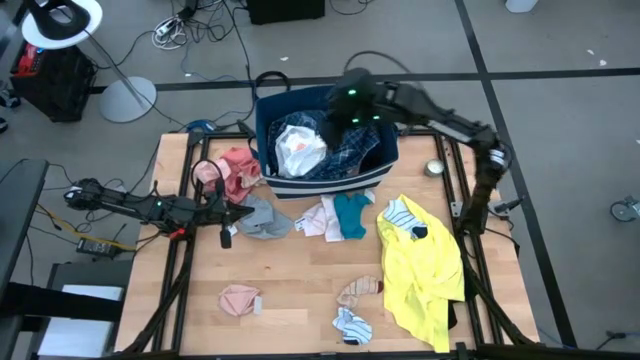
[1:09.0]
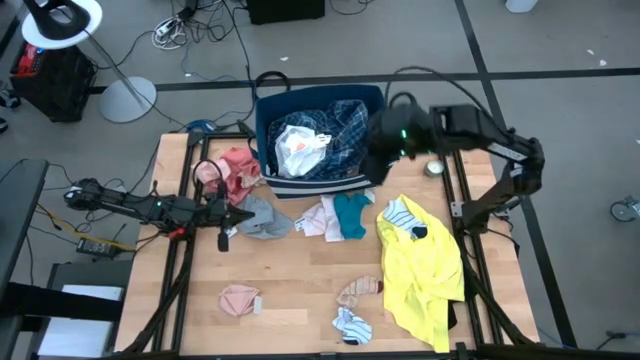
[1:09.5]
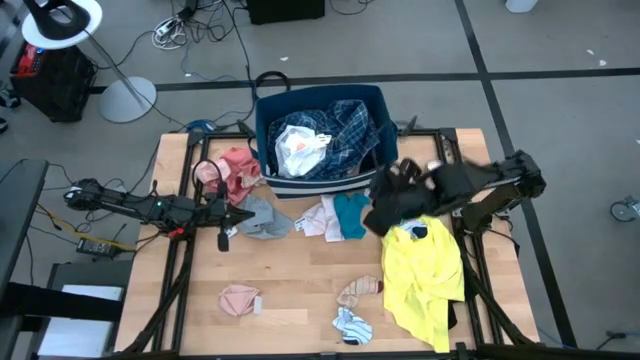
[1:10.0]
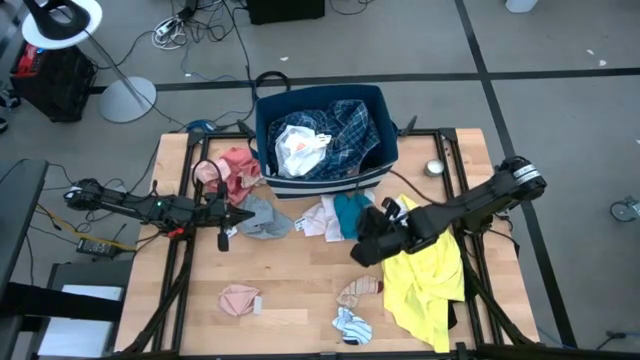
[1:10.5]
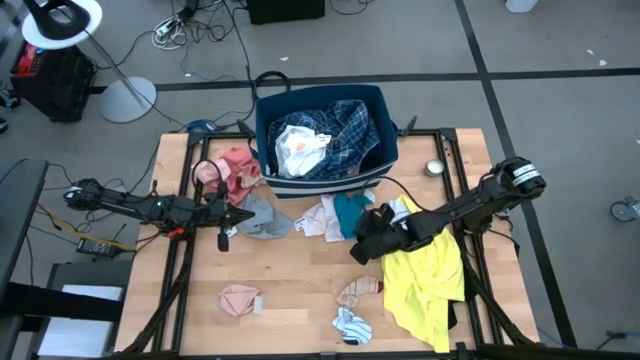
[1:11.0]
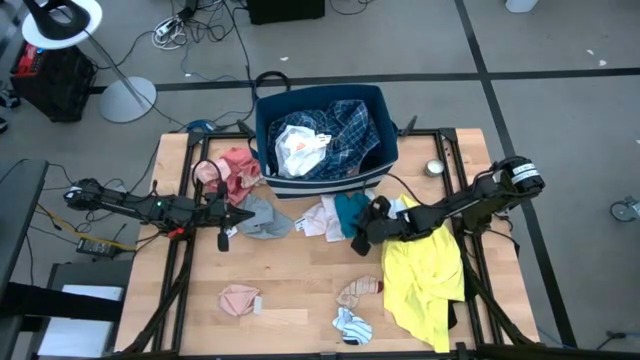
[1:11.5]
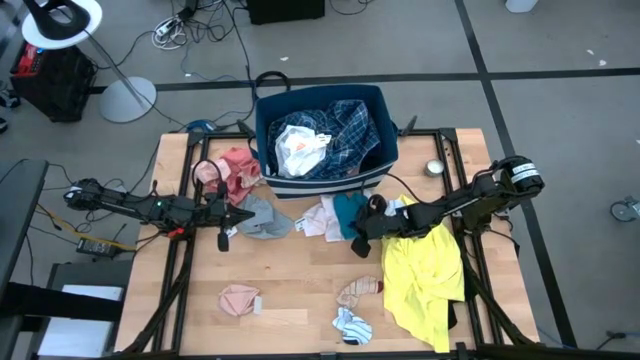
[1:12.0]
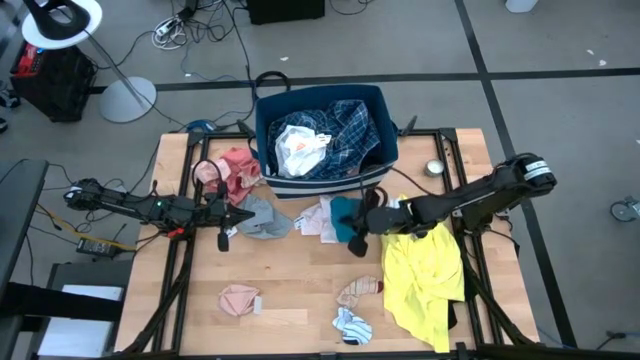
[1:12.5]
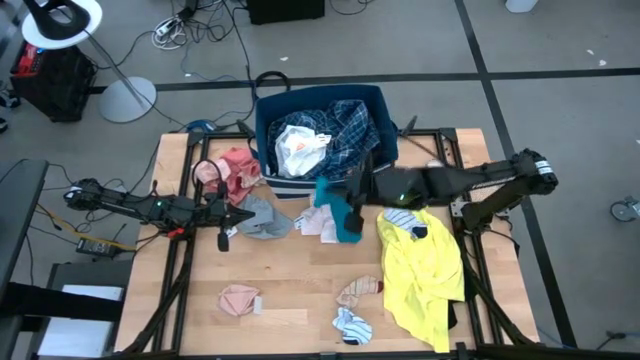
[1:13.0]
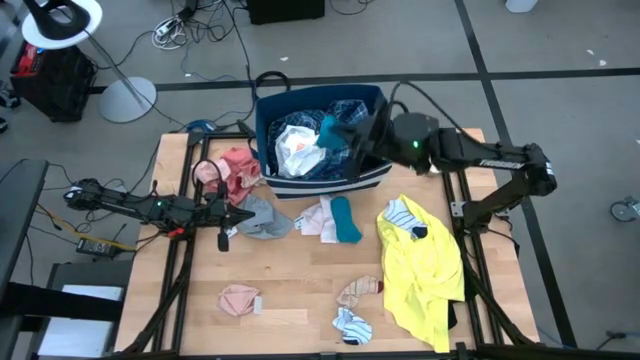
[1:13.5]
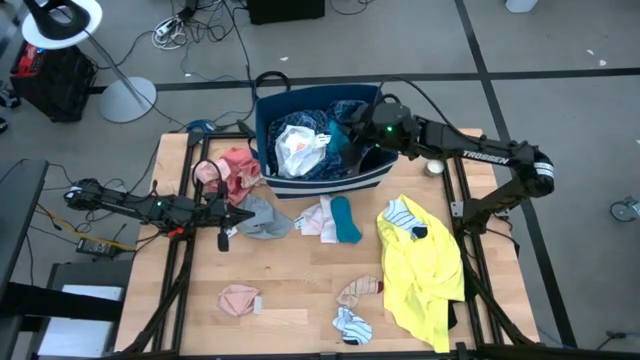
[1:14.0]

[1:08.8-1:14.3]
Task: Sort clothes
Put the right blue sock into the blue bin

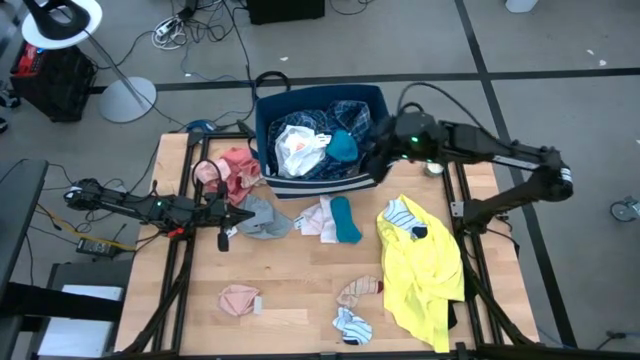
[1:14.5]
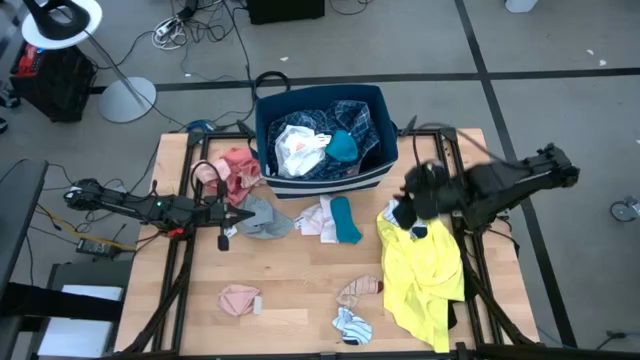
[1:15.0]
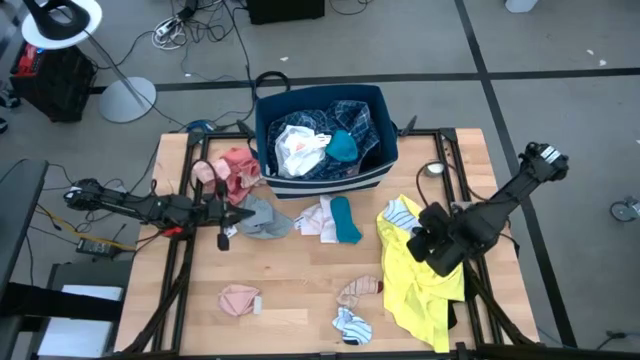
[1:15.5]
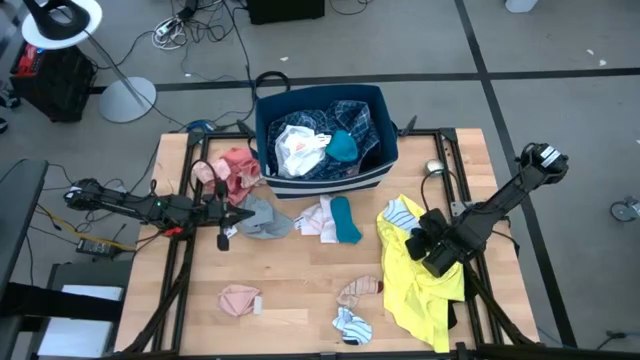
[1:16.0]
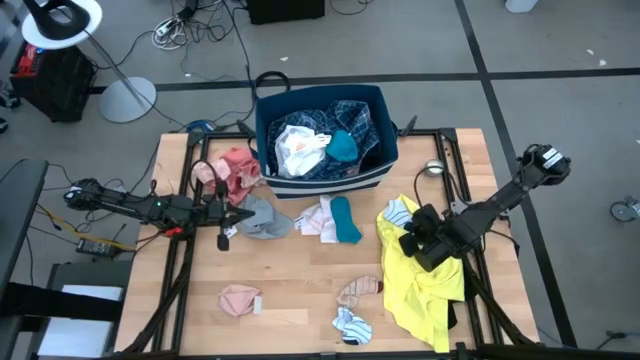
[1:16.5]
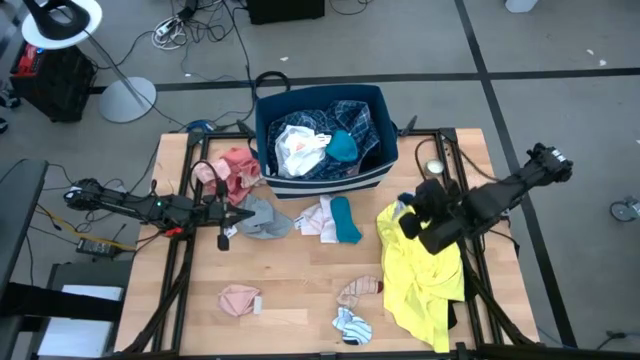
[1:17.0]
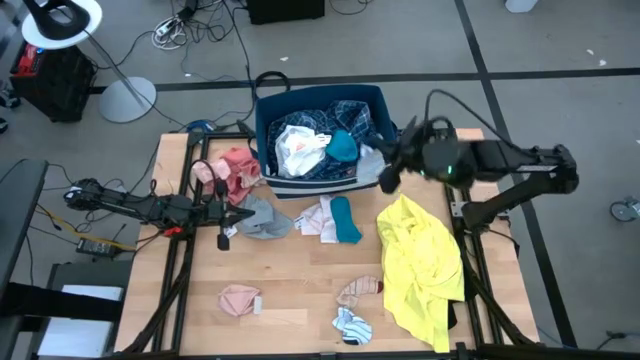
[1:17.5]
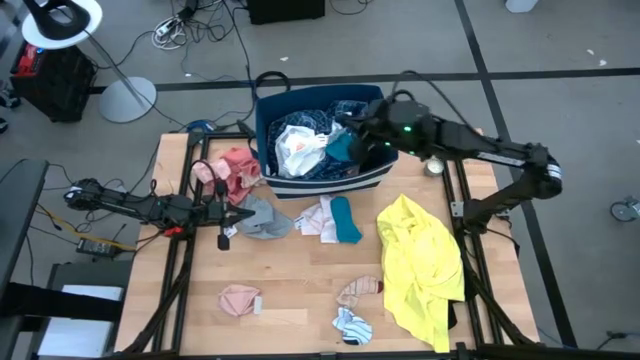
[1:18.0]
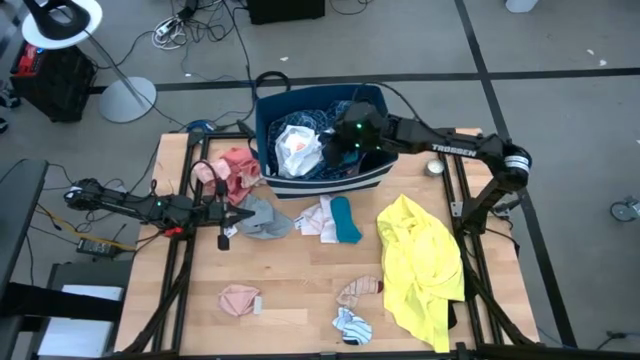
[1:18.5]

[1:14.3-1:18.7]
Put the top white striped sock into the blue bin

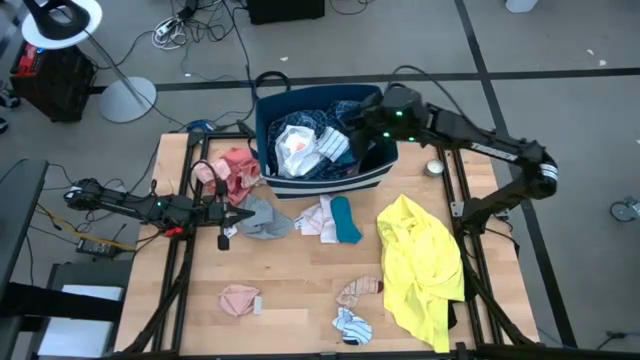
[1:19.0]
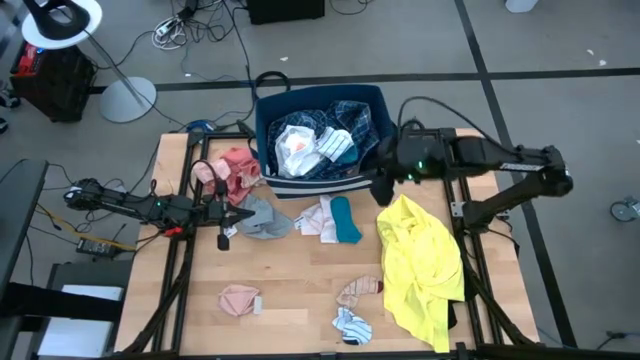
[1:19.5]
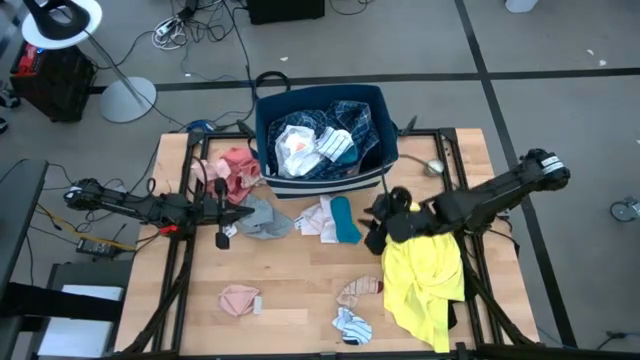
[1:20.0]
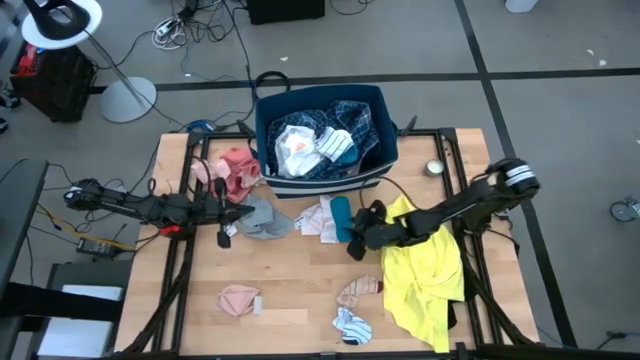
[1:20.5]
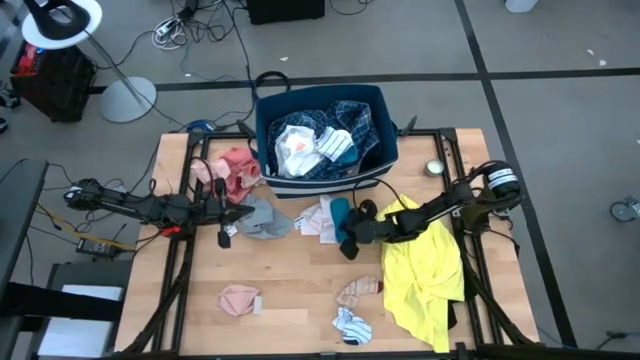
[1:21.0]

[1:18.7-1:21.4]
Put the blue sock into the blue bin

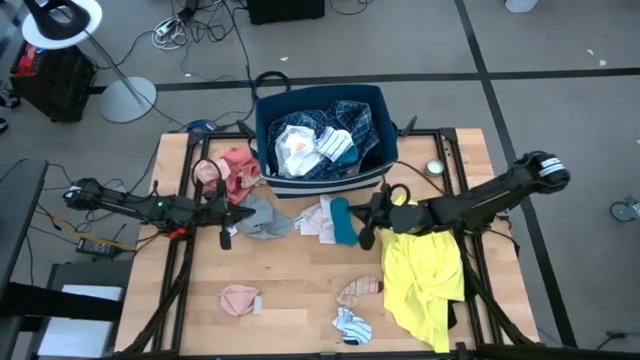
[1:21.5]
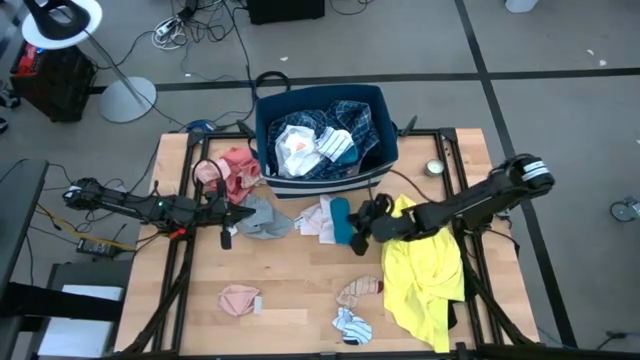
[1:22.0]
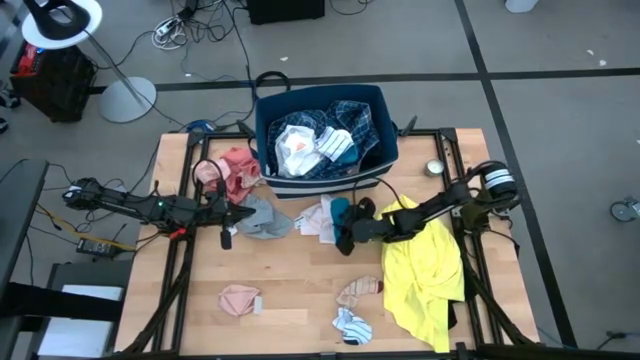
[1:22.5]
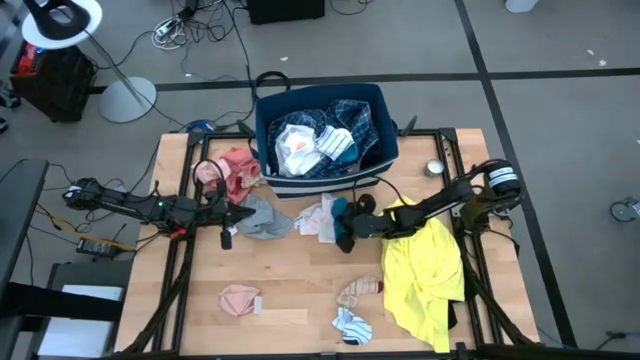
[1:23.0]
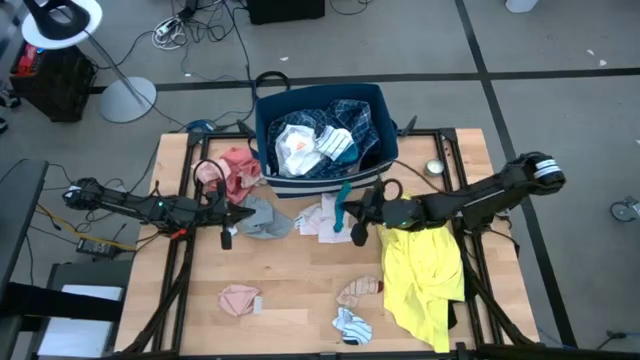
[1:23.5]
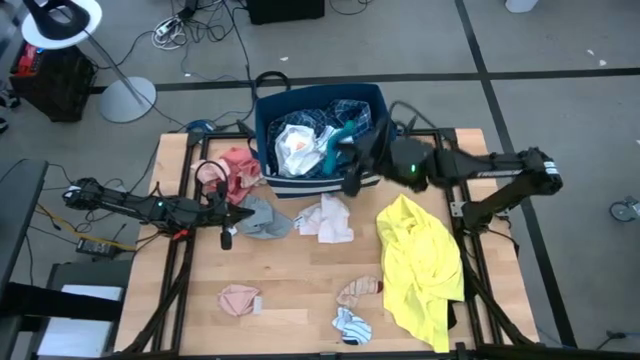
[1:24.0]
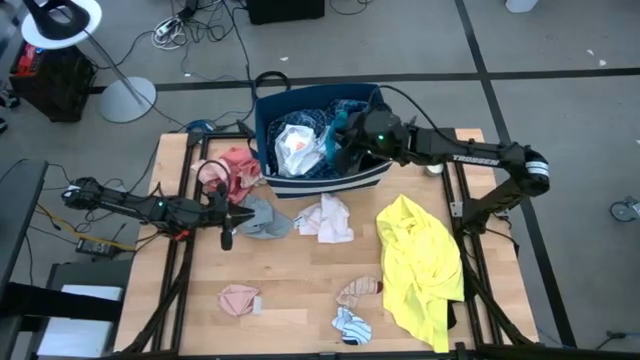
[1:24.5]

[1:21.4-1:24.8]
Put the blue sock into the blue bin

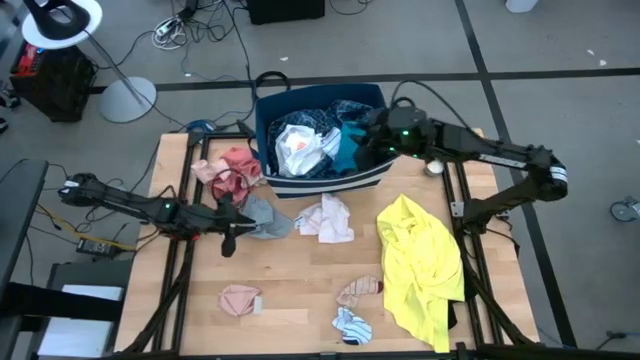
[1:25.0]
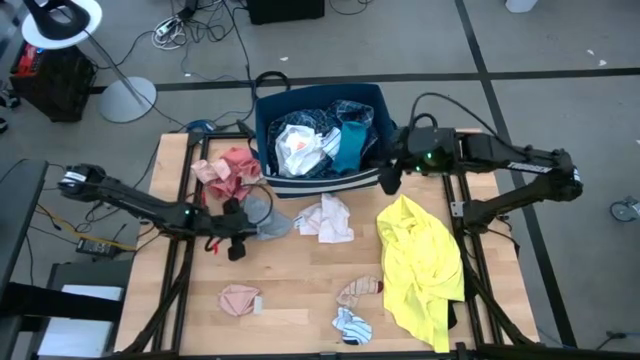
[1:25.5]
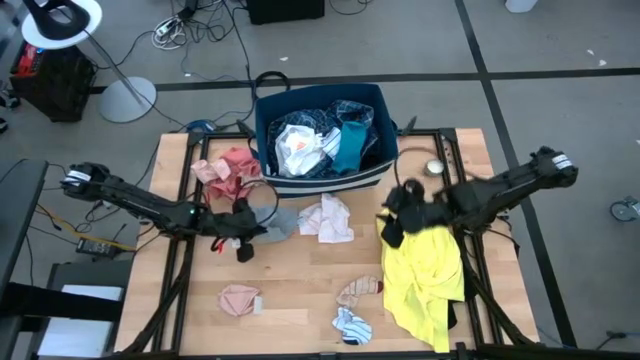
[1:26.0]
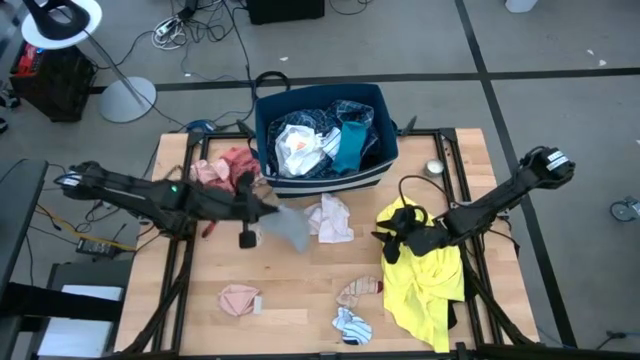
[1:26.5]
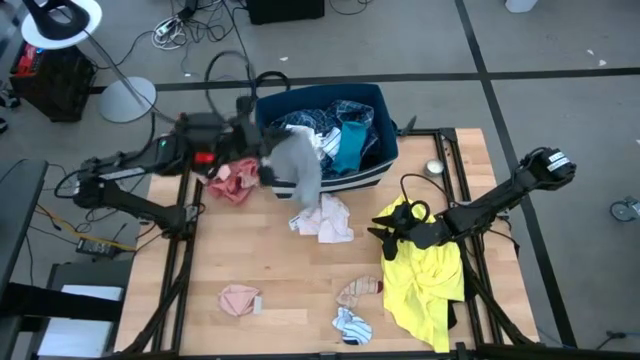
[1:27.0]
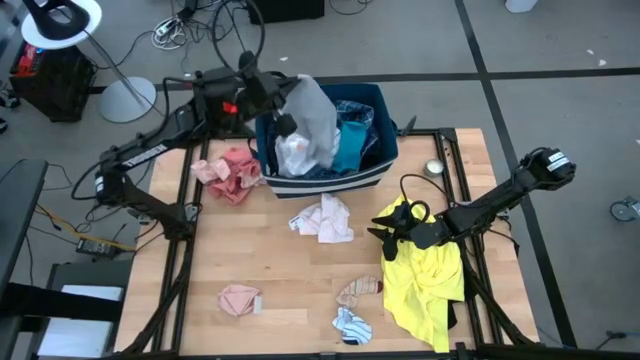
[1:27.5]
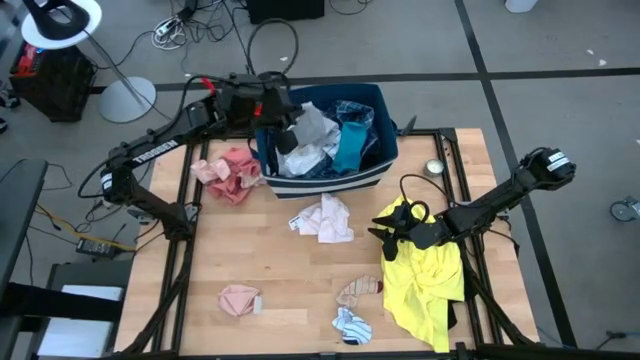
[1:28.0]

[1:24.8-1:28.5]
Put the gray underwear into the blue bin

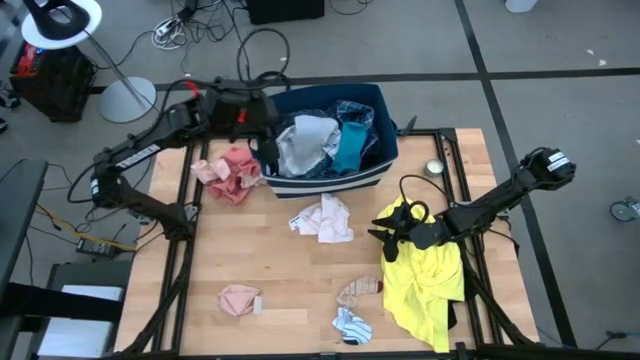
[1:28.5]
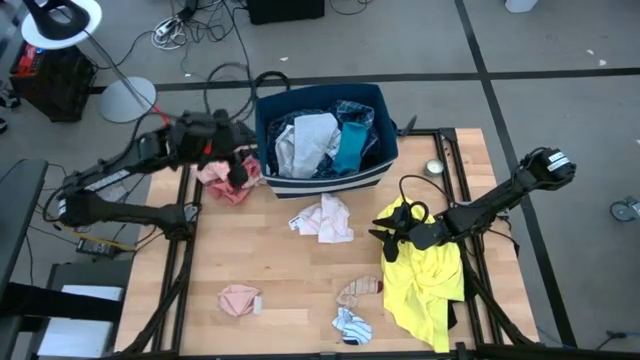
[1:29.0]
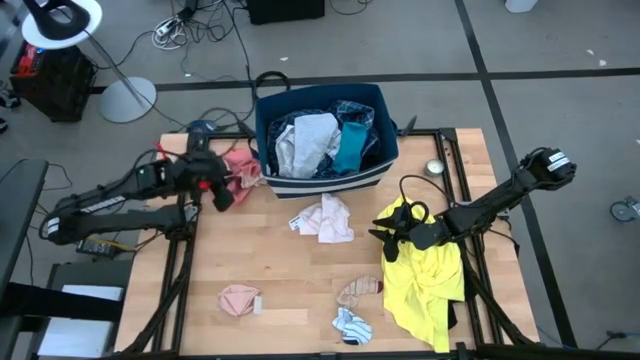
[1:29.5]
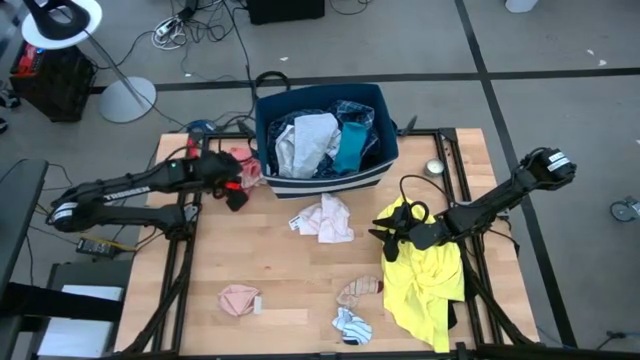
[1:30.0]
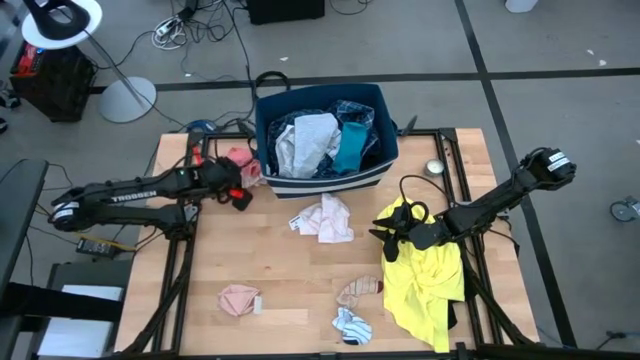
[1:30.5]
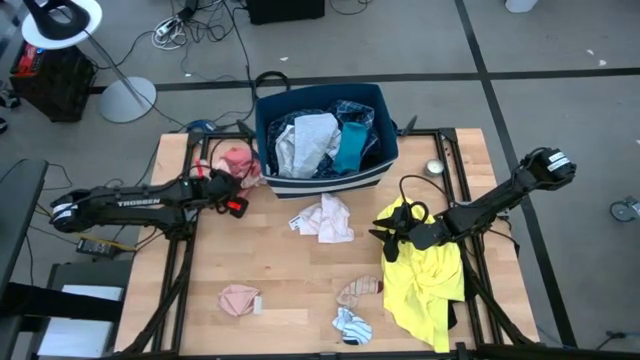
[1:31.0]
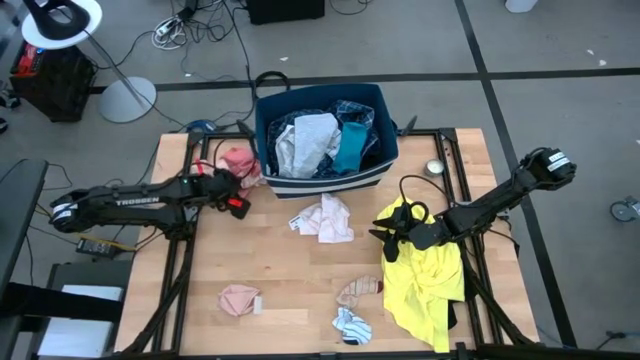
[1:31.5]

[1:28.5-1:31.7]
Put the light orange underwear into the blue bin
